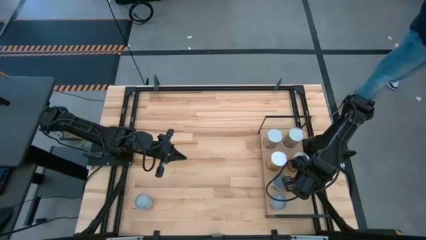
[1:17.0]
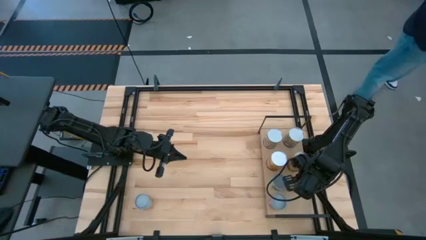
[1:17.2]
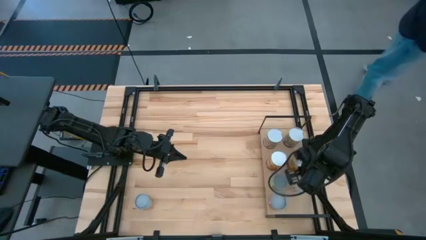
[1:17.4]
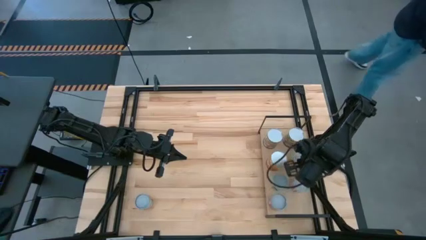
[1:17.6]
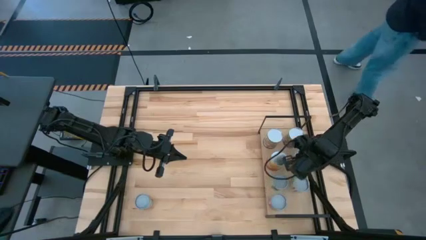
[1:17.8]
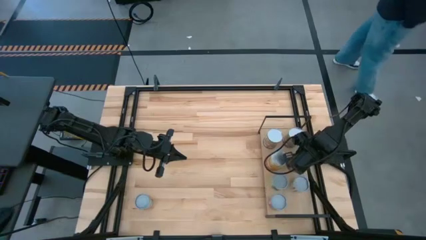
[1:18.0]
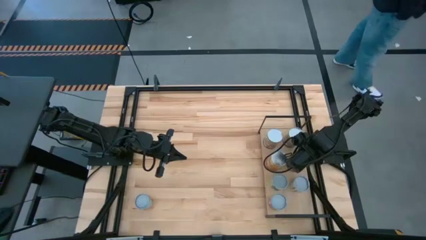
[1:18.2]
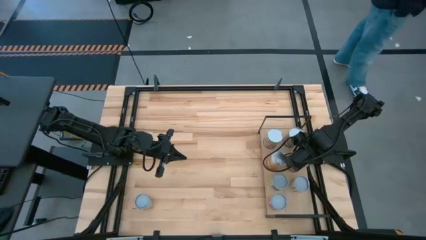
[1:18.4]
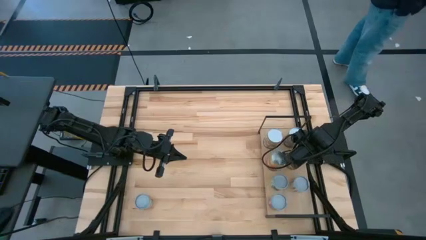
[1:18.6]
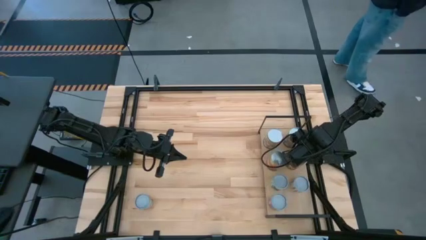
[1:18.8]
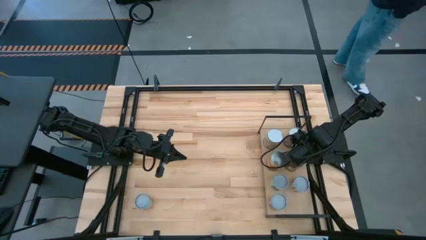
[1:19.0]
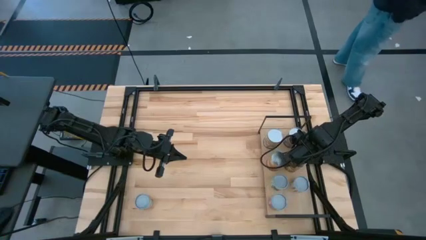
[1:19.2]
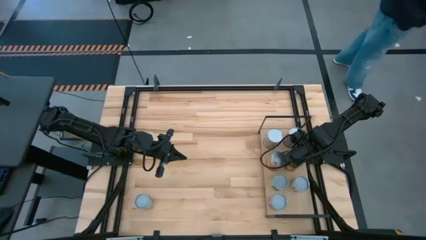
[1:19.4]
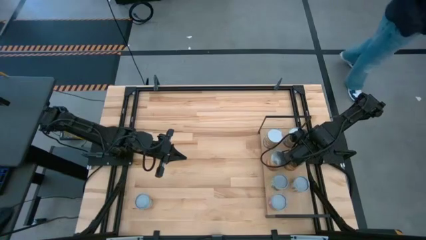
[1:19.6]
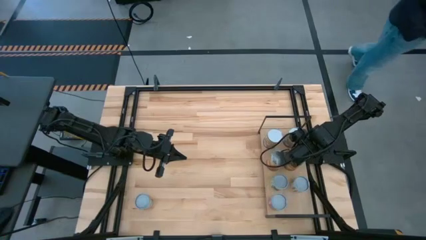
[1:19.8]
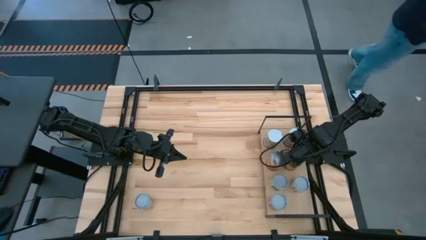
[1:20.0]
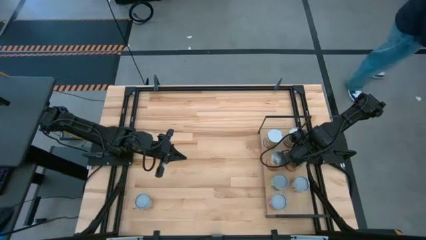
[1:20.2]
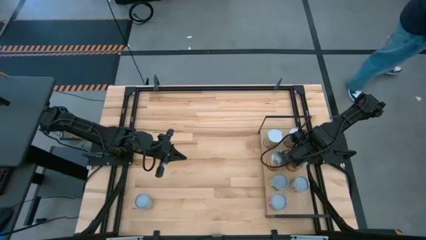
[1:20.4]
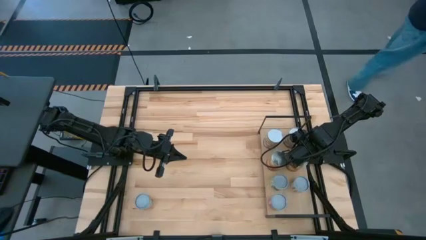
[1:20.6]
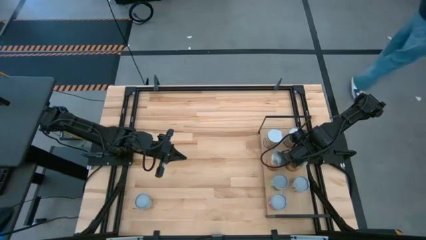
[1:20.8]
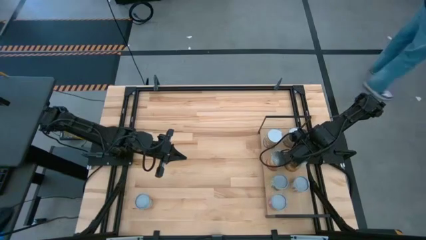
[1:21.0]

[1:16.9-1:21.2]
Task: Pick and place cans onto a shelf
Adjust the canned corn

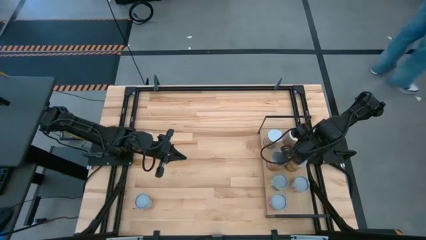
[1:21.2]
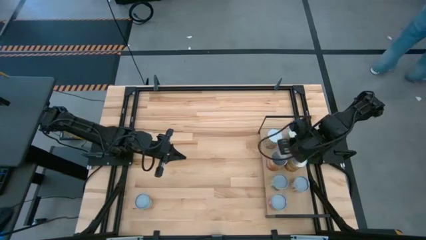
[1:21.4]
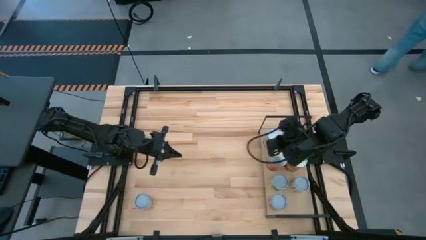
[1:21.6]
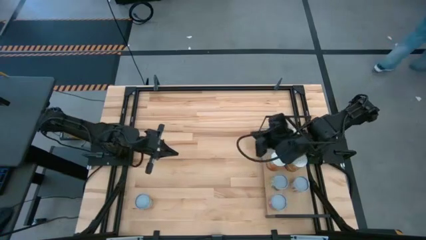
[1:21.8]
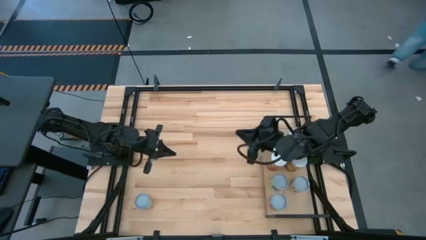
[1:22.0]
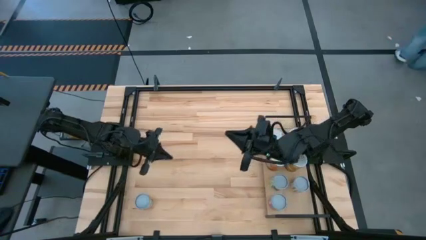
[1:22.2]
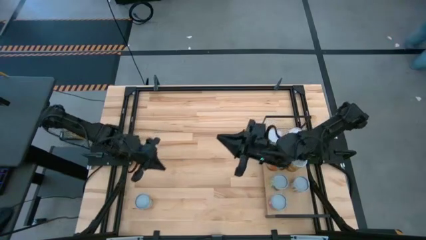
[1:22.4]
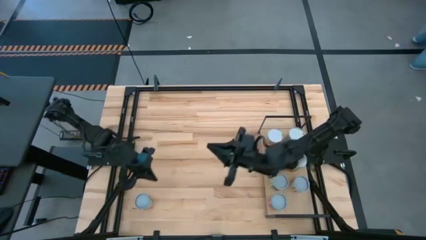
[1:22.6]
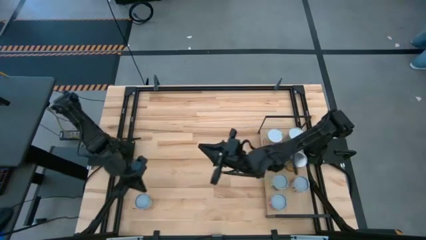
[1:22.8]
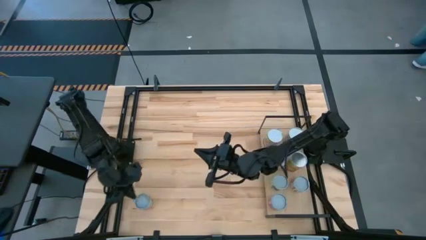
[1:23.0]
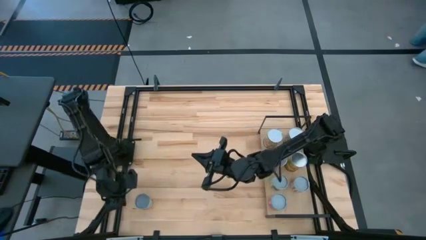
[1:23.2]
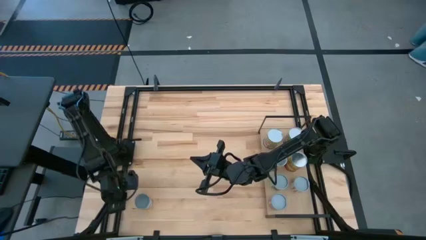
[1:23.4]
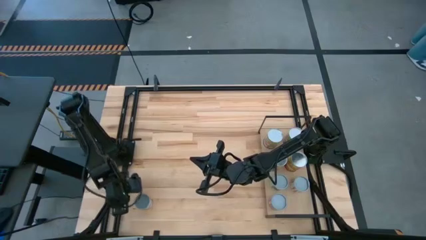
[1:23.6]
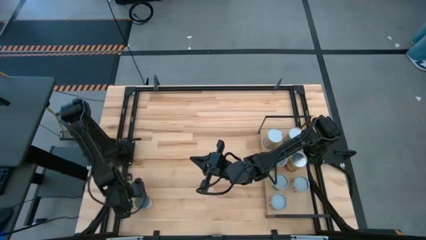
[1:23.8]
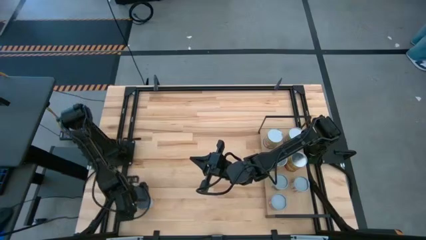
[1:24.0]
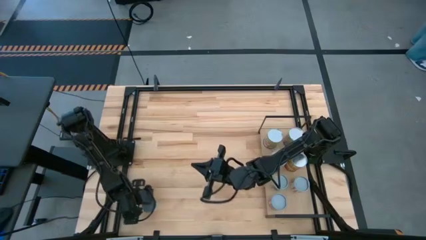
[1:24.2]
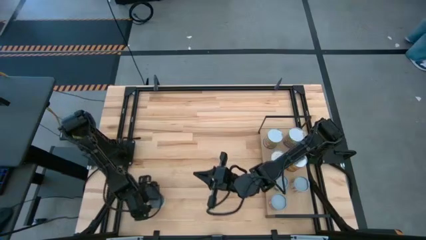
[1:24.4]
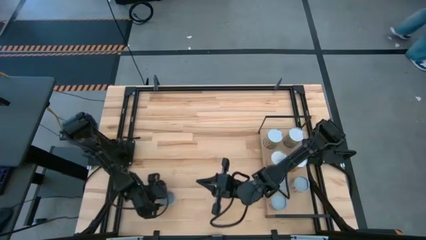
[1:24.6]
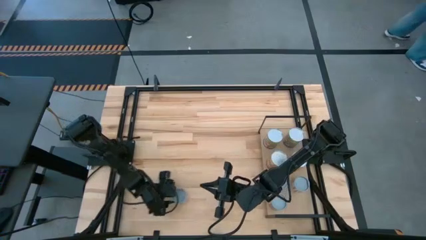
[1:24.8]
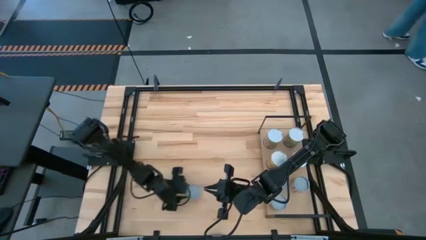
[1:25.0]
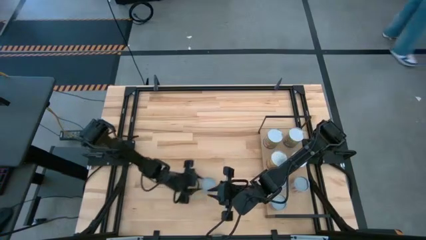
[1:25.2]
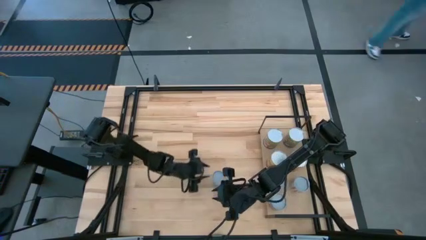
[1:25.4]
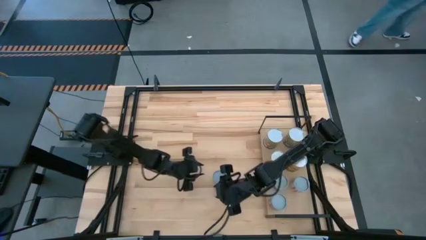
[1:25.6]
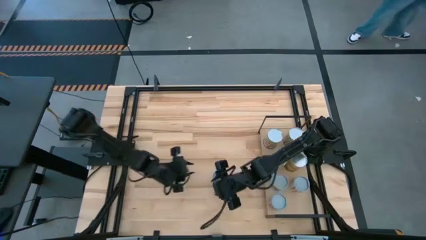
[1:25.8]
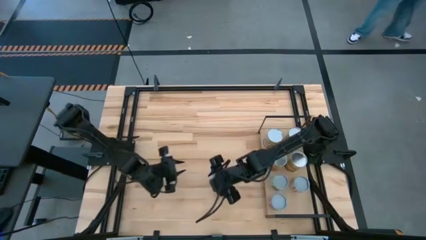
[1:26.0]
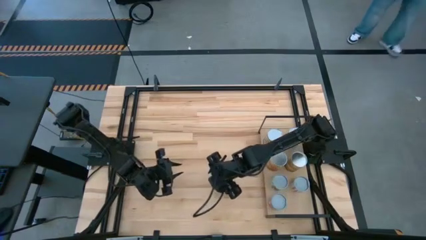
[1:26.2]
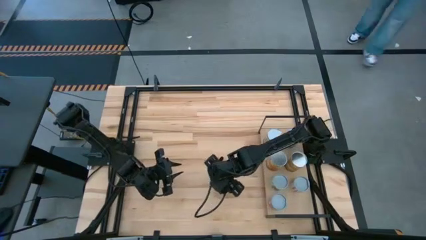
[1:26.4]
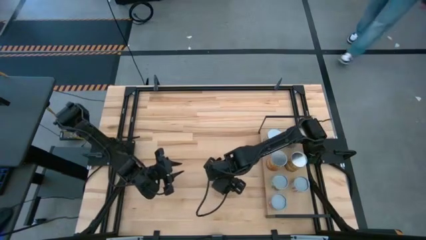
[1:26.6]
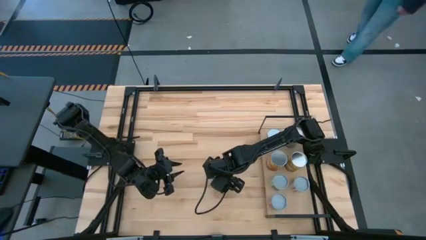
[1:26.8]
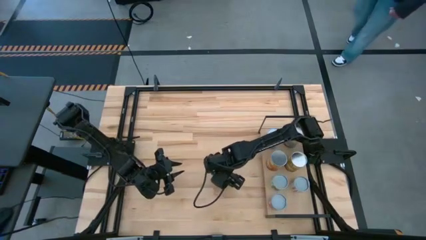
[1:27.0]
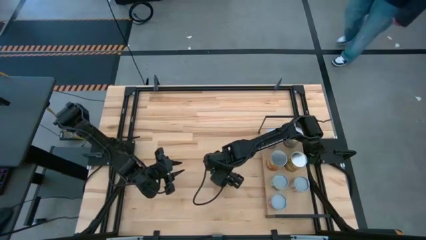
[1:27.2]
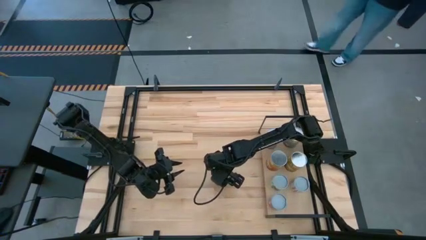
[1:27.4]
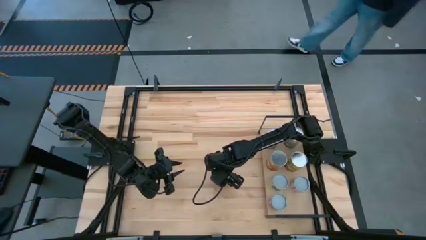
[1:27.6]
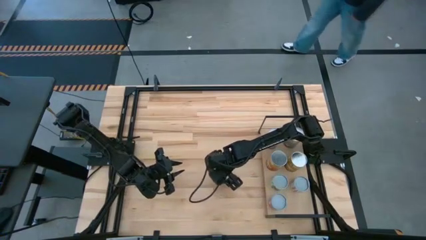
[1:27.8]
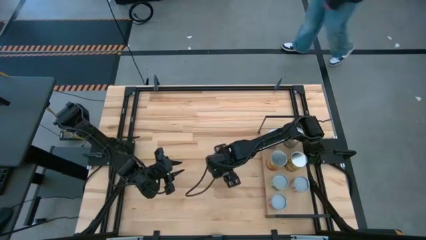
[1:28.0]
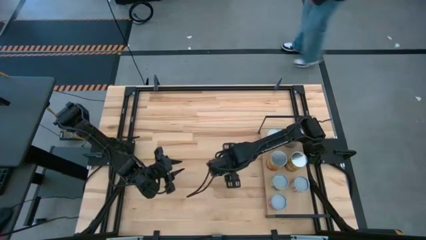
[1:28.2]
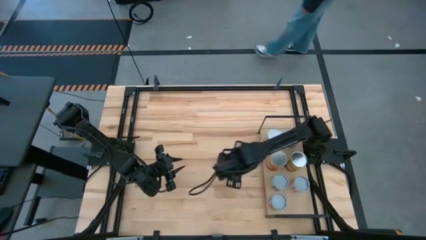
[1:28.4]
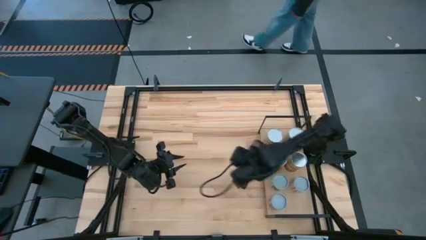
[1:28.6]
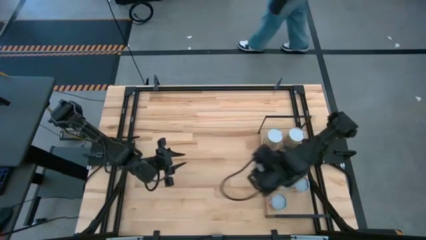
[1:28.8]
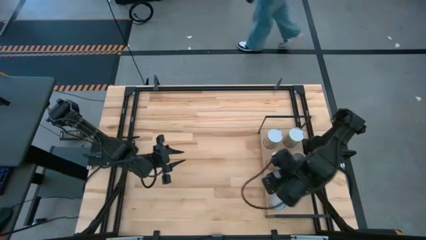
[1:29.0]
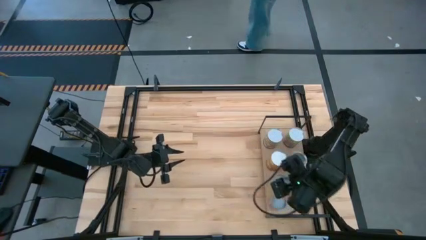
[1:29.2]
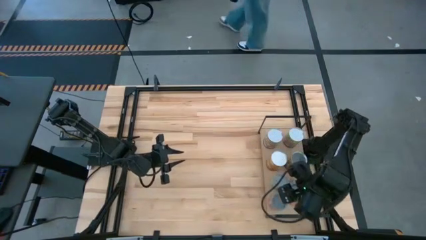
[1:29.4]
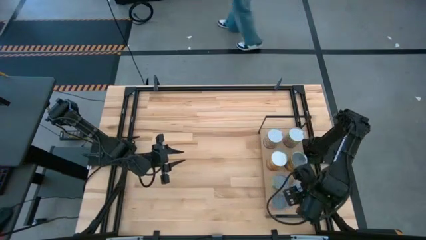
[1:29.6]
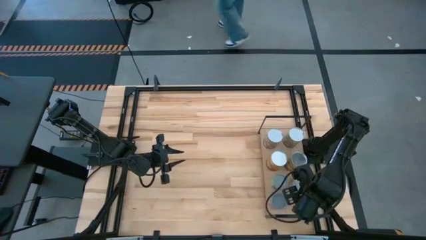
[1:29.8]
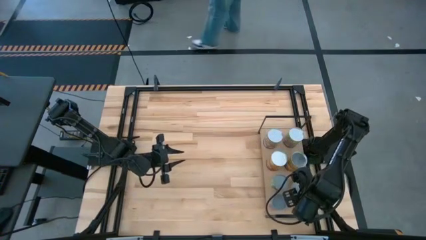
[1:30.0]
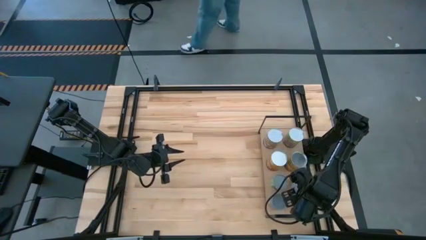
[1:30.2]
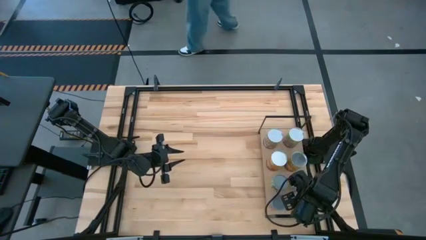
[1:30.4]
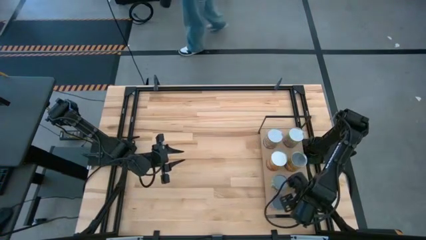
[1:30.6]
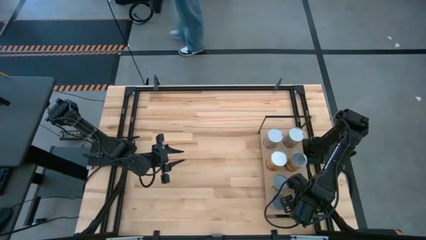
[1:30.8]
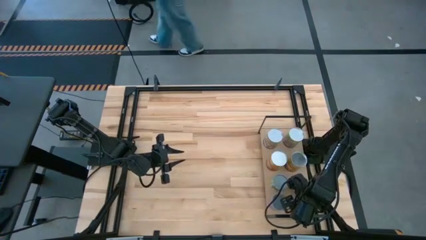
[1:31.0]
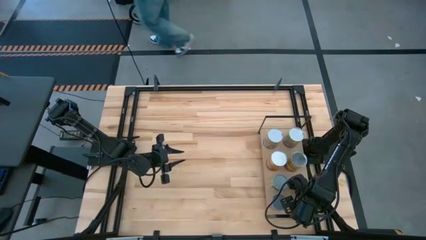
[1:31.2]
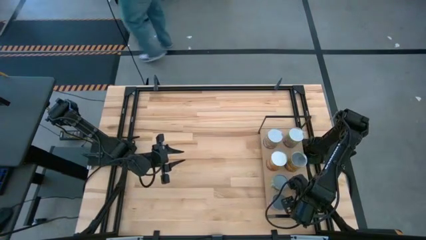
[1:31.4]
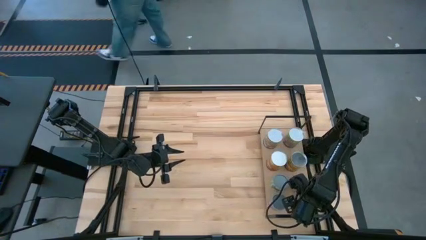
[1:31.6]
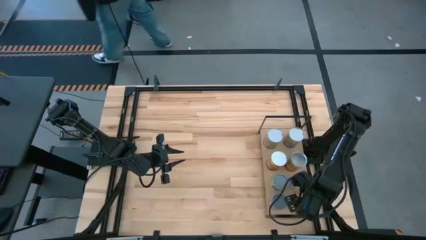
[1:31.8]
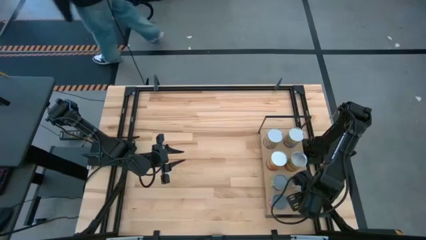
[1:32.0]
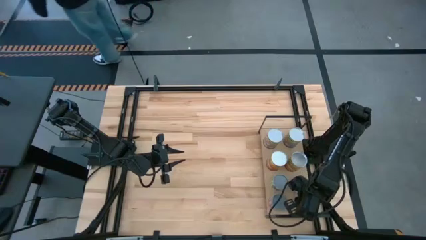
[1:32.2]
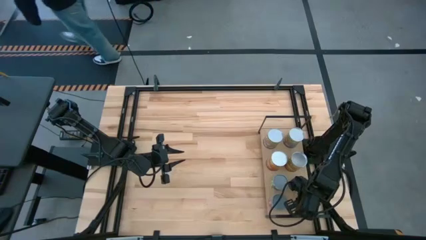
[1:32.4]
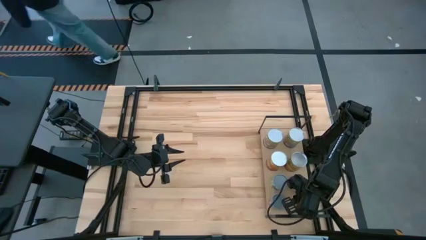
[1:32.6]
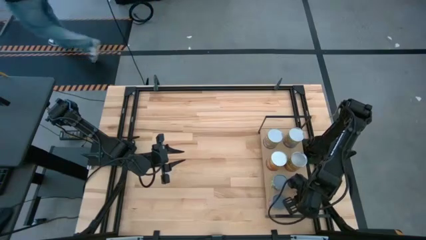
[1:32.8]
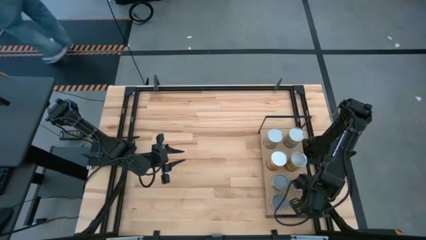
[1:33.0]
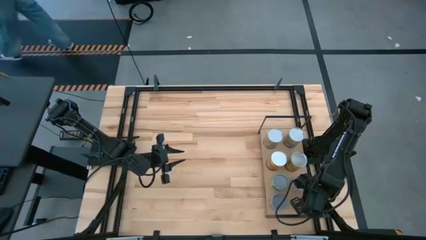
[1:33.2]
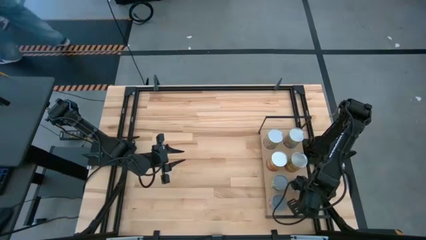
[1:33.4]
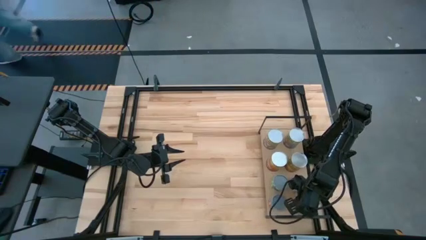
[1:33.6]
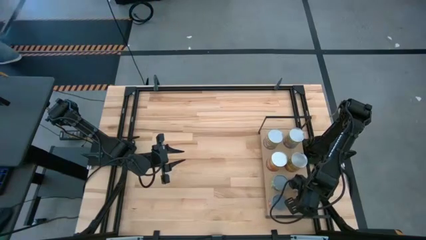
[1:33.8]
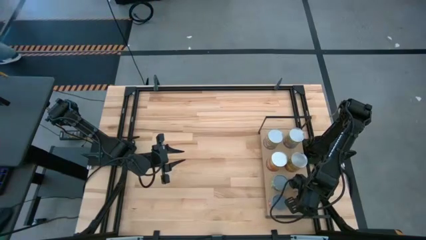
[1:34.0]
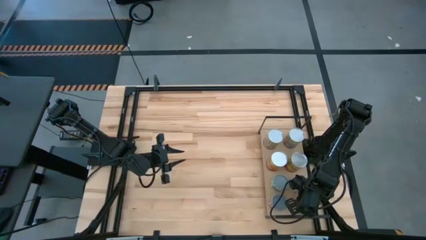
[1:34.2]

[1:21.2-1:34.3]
Put the small canned oranges on the shelf
